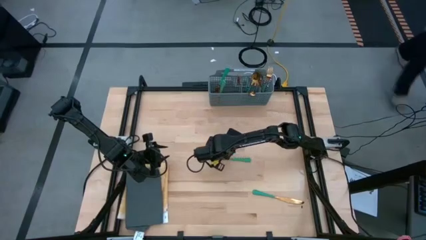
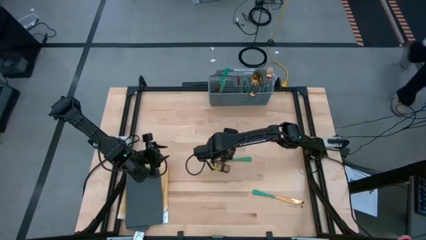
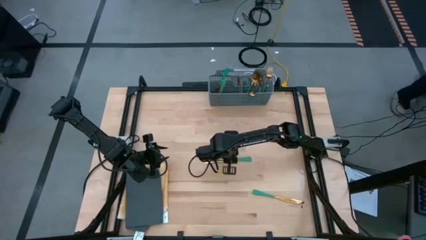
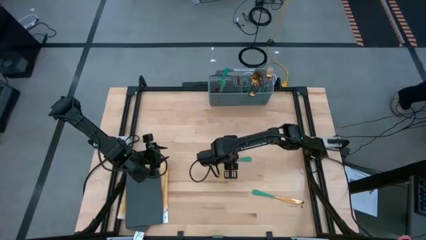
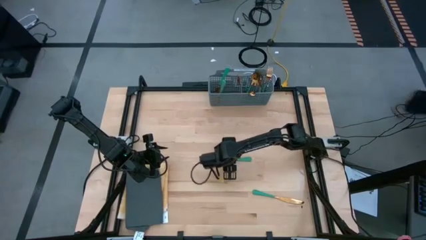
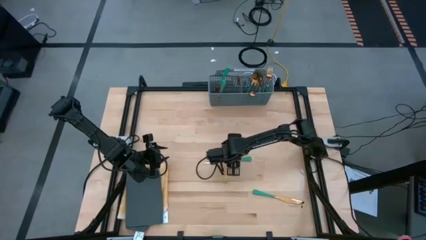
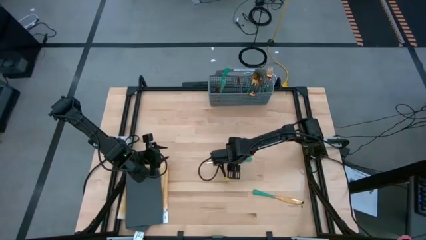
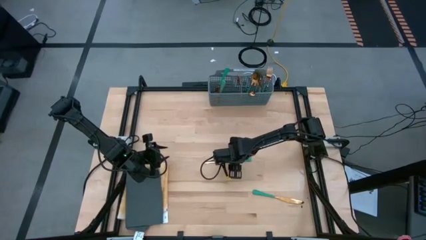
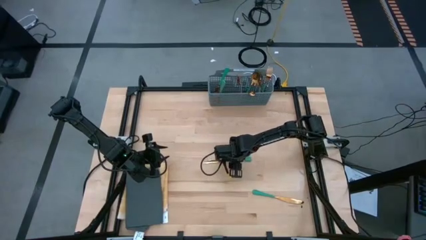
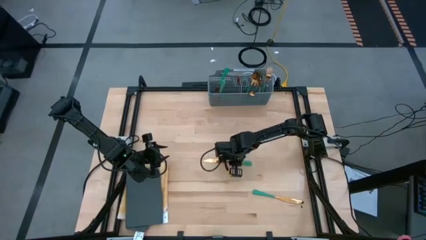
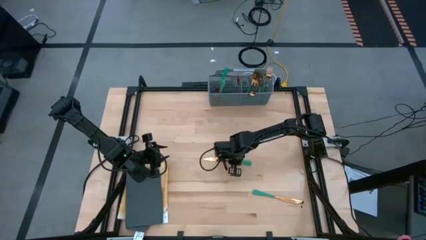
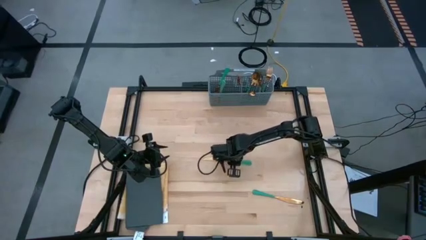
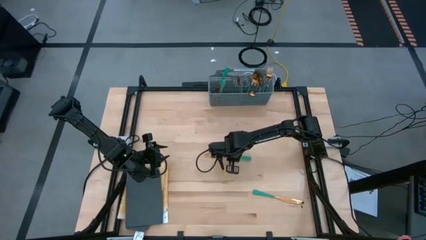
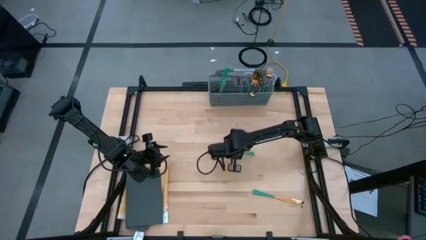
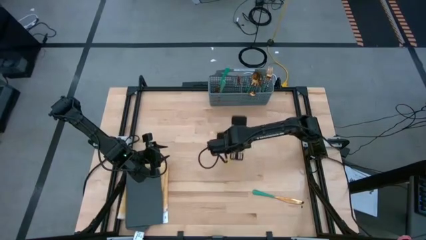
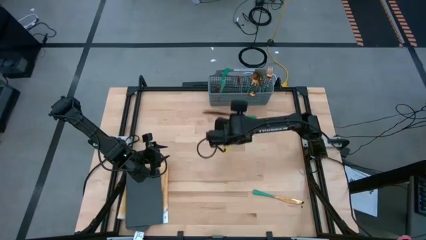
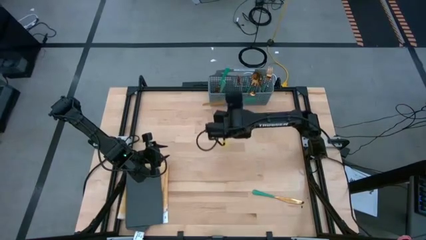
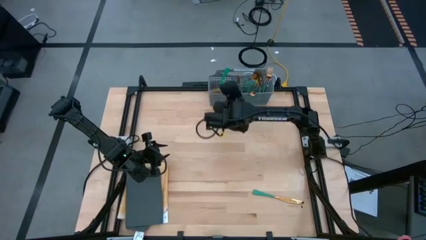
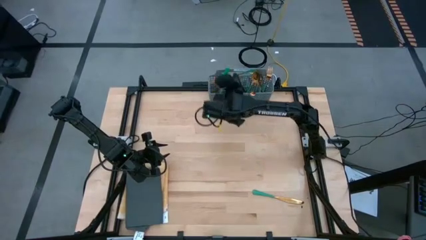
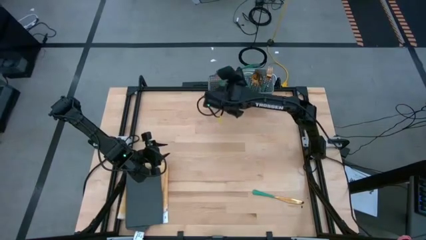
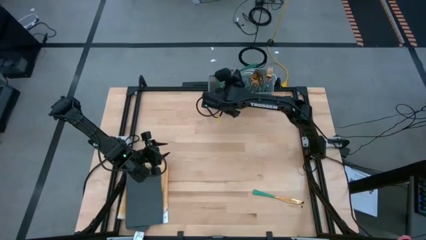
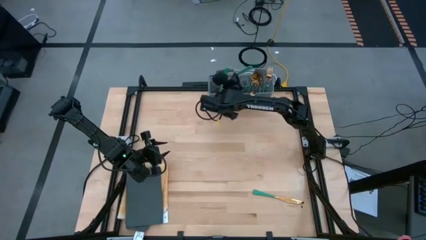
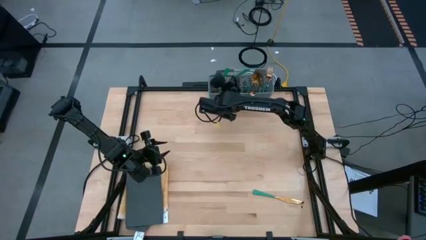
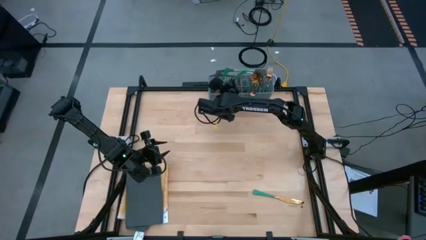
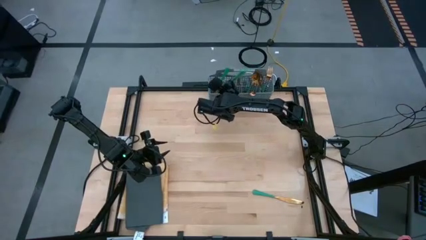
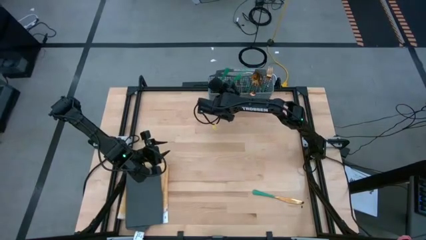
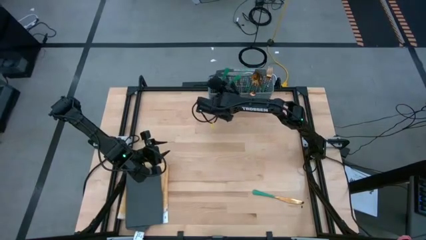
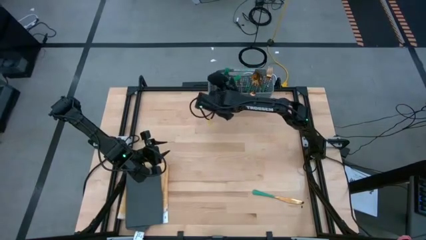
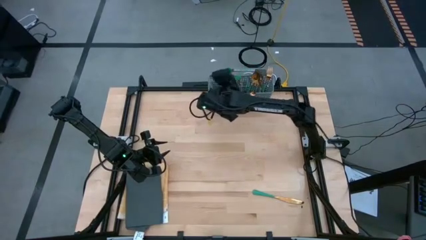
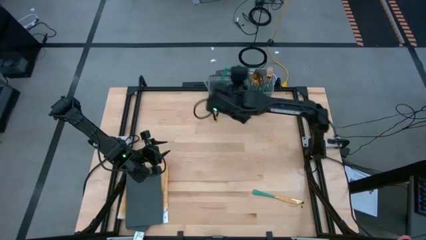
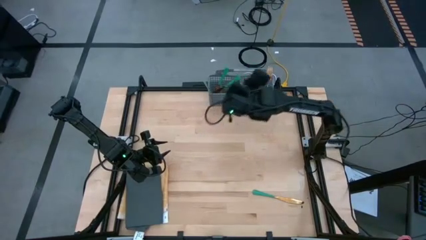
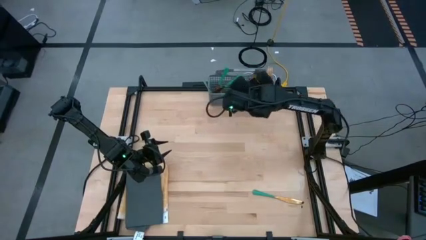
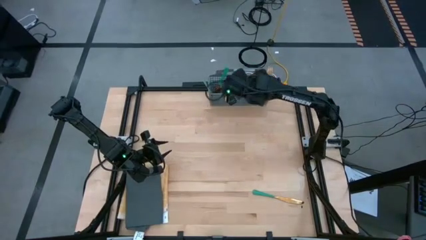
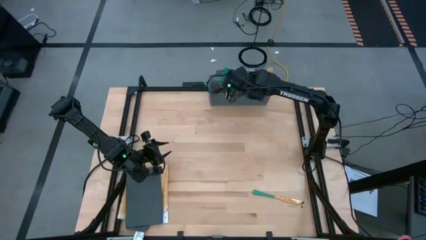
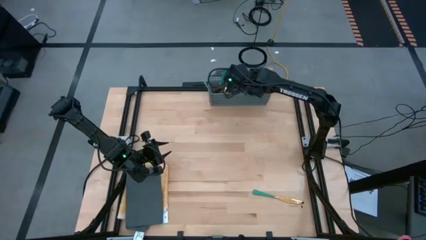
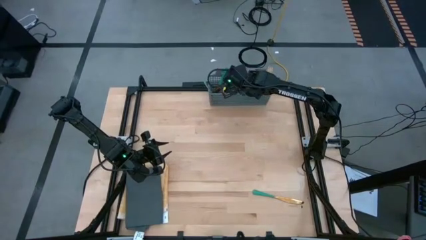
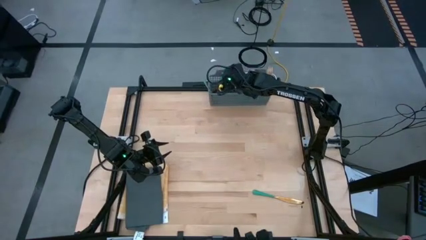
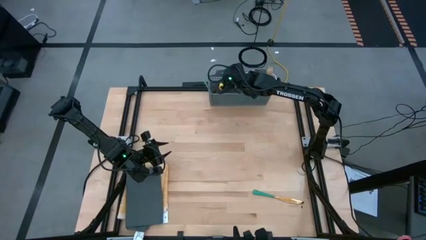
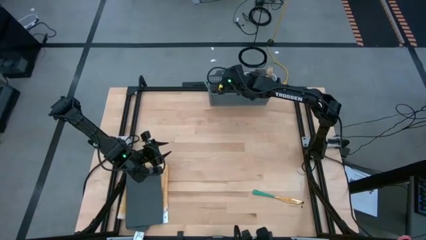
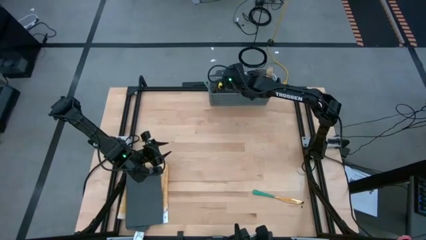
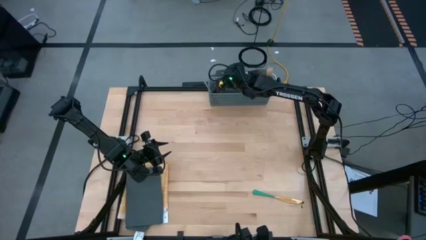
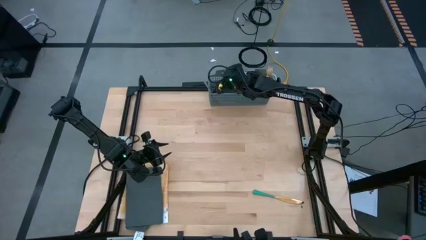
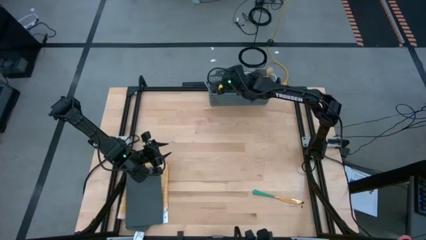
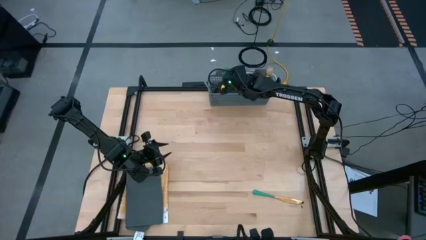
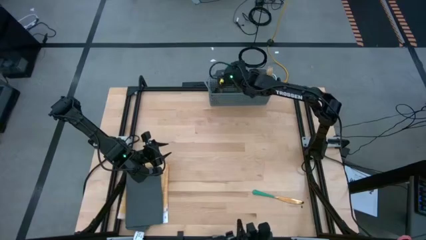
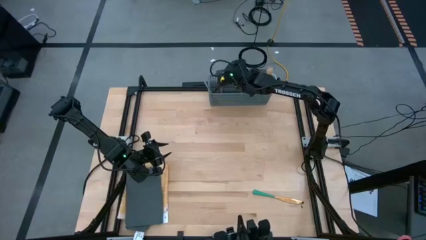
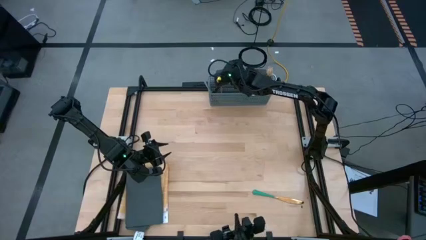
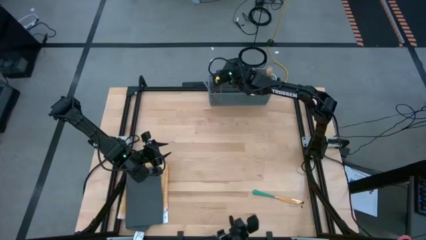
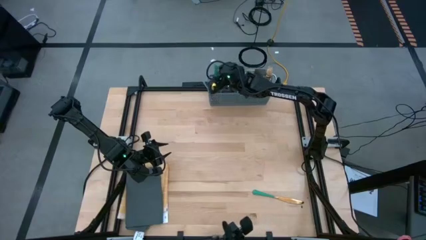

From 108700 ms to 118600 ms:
Task: Sort silverware
Put the green knife into the gray silverware holder

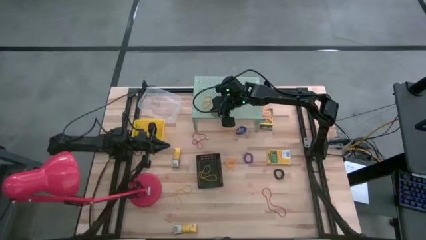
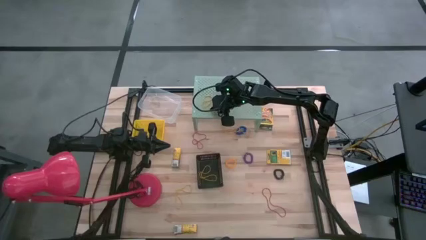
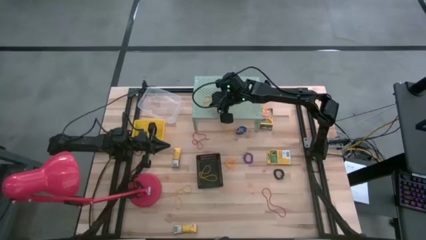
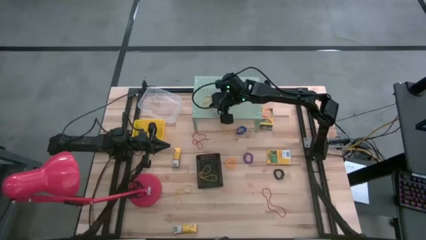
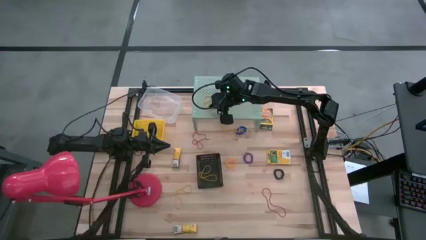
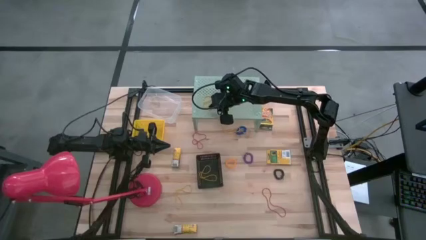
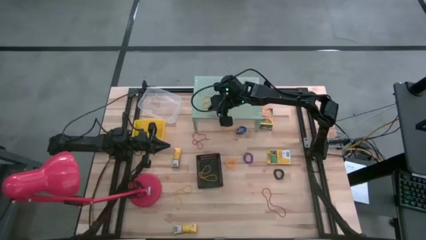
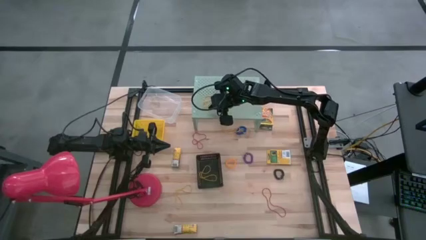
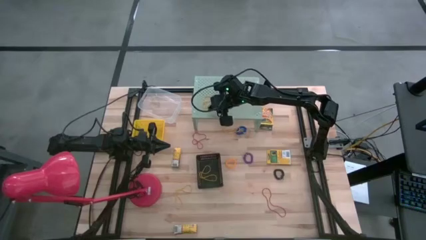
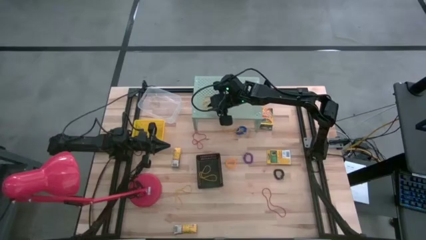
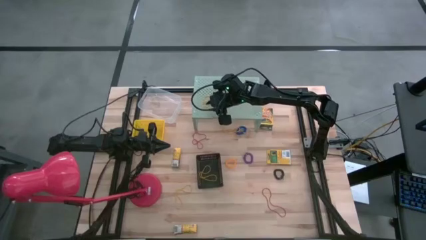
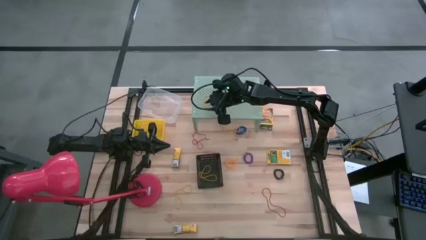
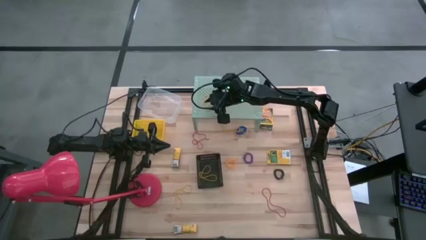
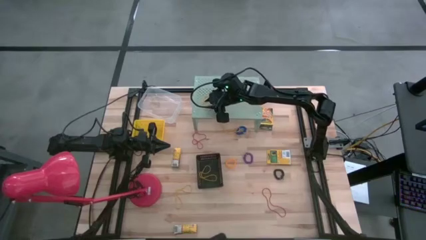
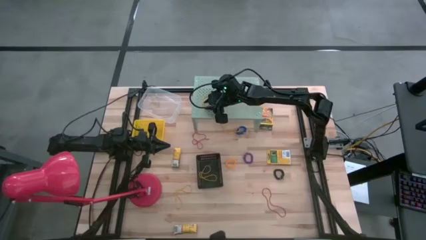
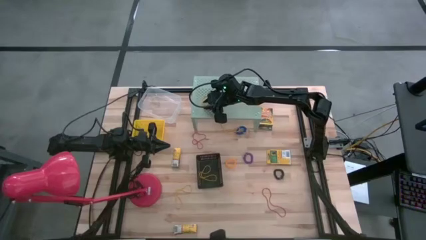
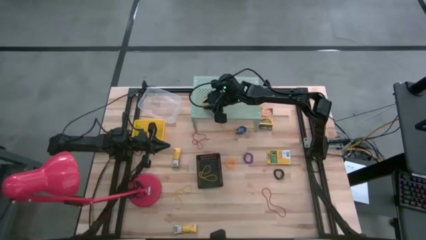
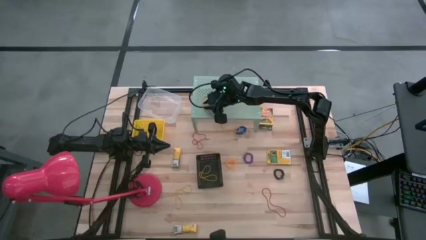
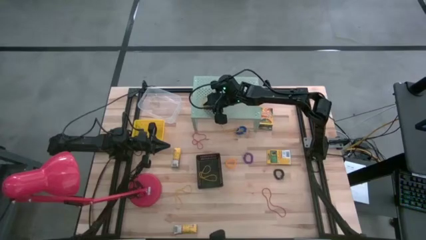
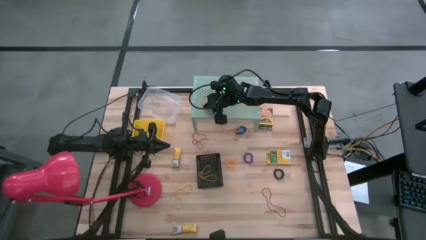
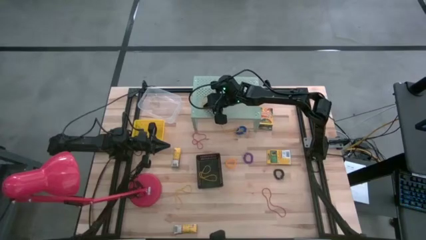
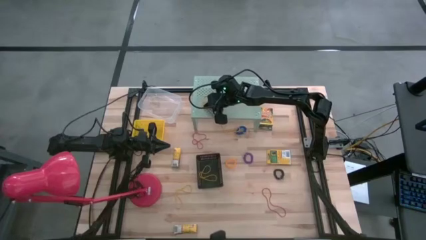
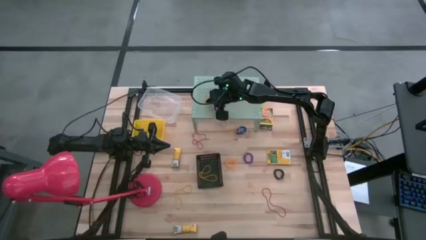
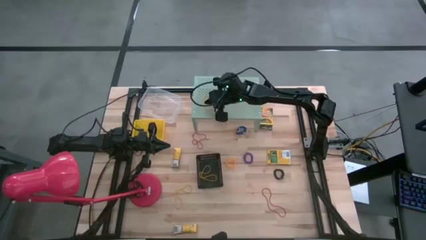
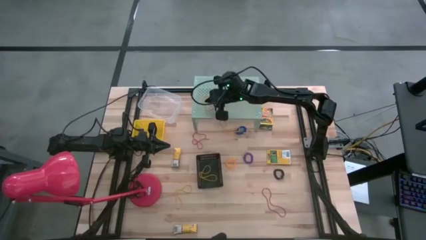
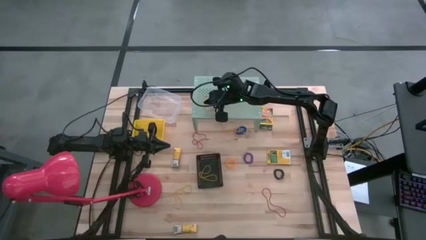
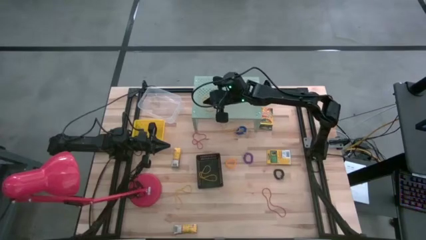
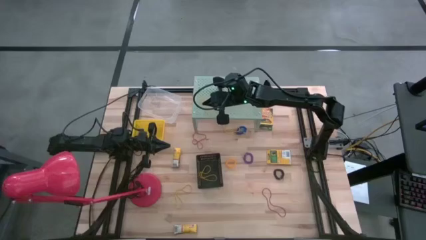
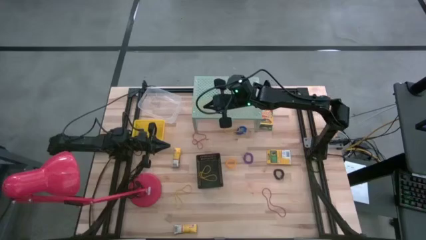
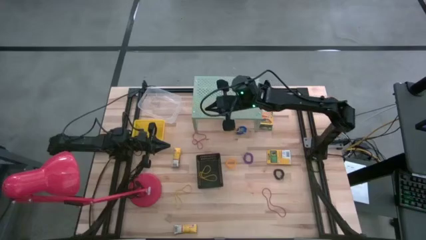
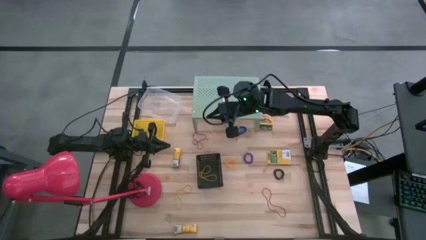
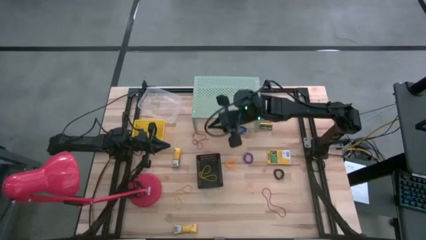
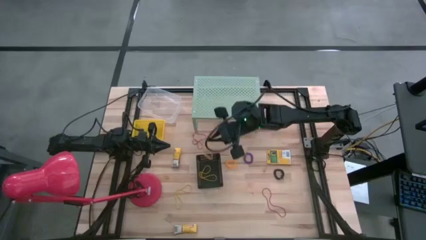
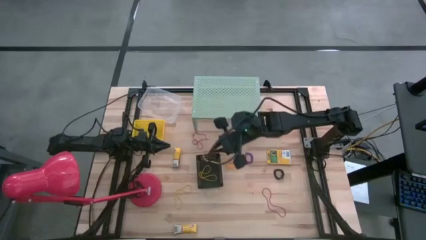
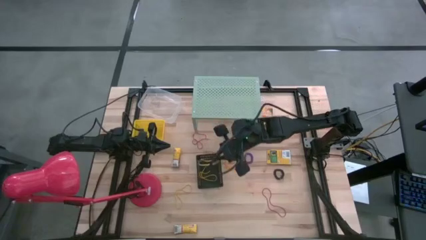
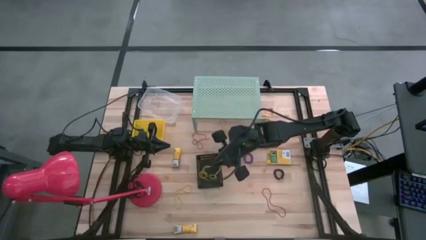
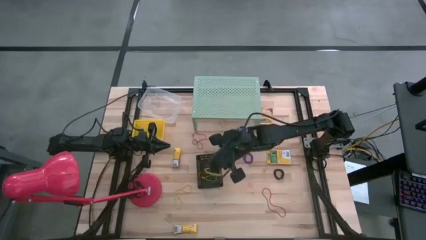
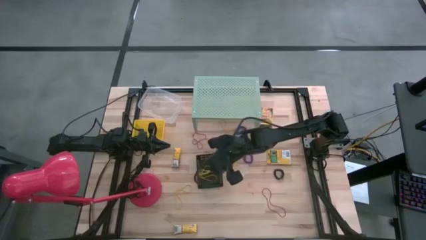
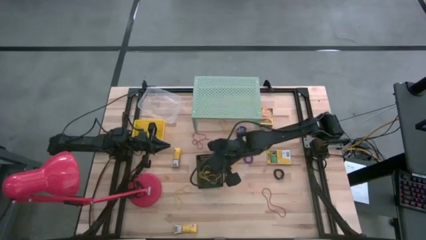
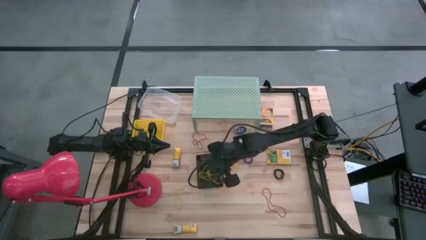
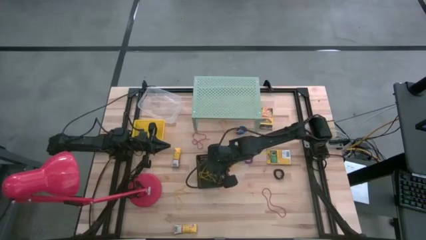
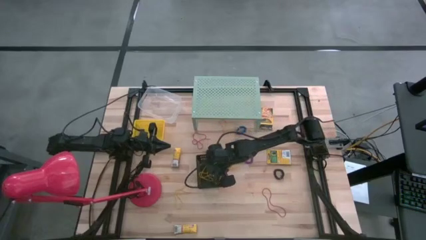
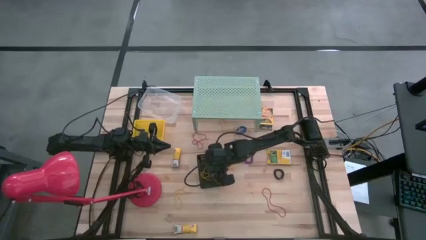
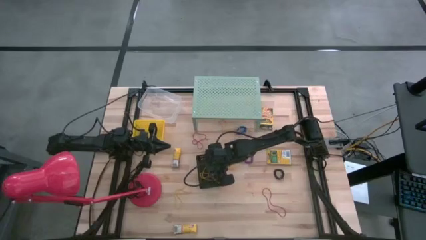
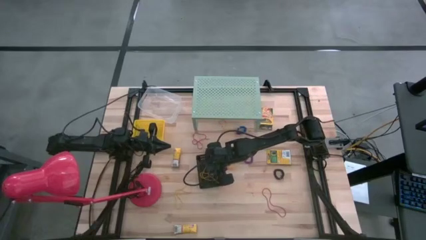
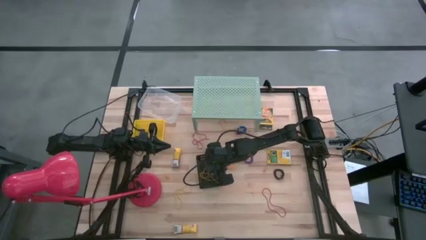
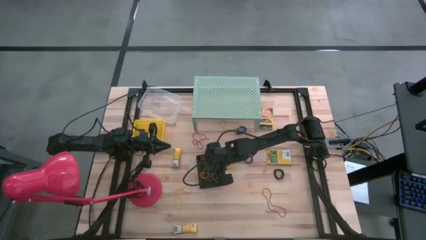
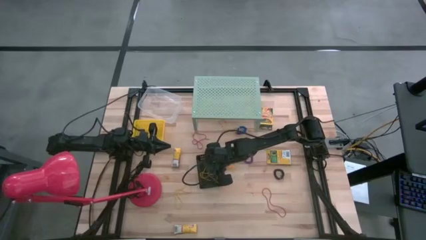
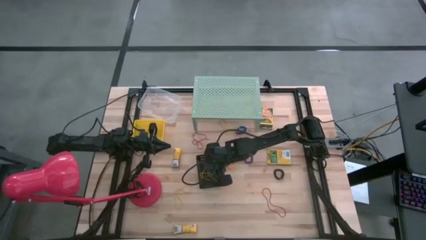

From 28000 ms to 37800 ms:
Task: Pick & Place Office Desk Supplies
Put the yellow rubber band from the shelf into the black bin
